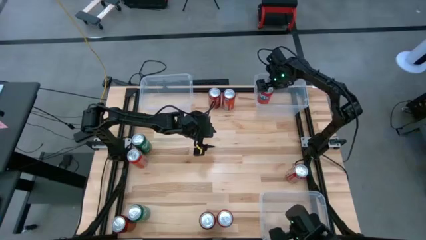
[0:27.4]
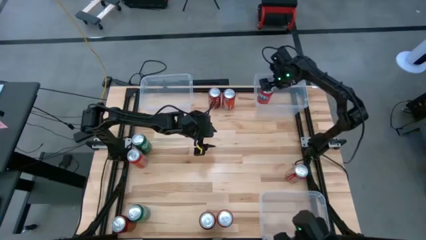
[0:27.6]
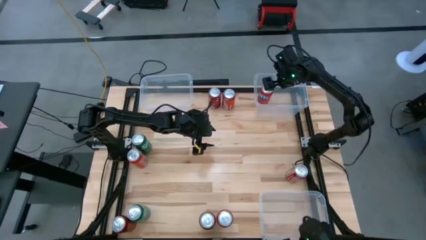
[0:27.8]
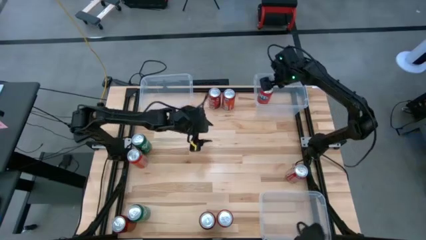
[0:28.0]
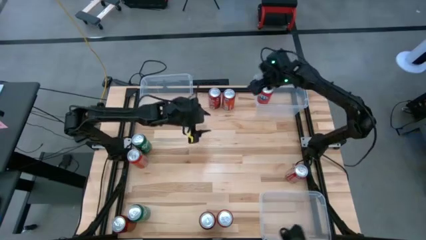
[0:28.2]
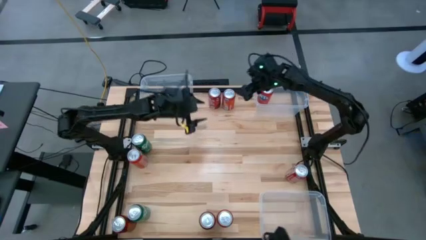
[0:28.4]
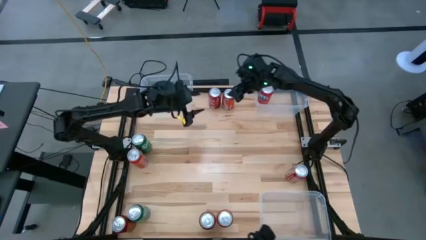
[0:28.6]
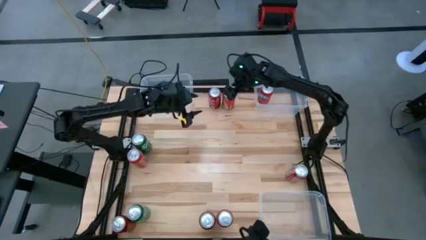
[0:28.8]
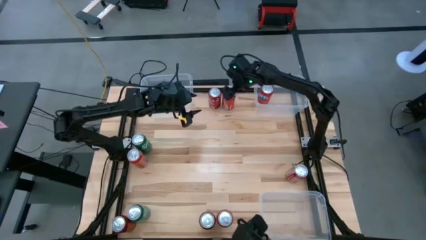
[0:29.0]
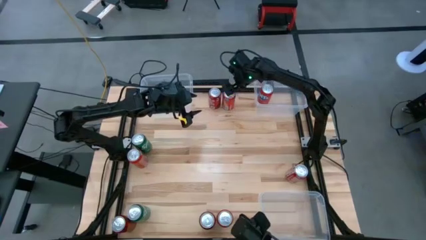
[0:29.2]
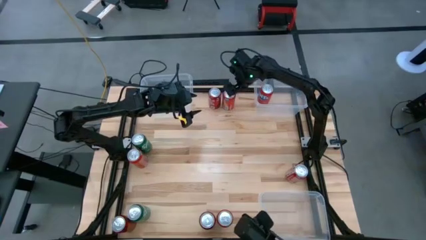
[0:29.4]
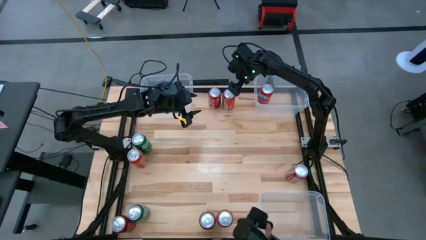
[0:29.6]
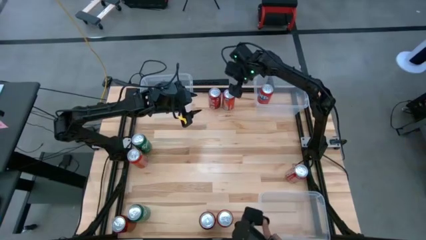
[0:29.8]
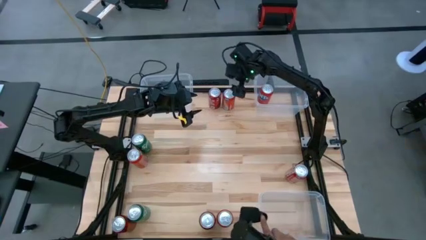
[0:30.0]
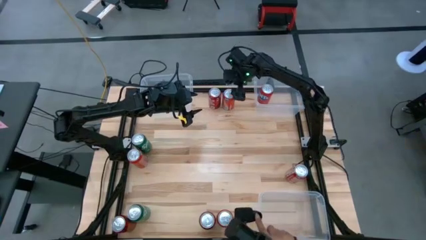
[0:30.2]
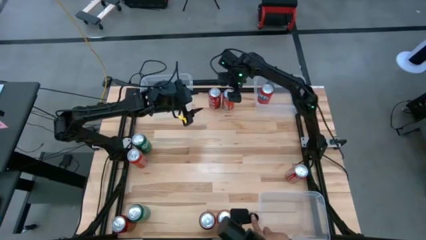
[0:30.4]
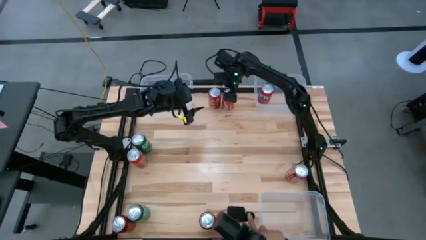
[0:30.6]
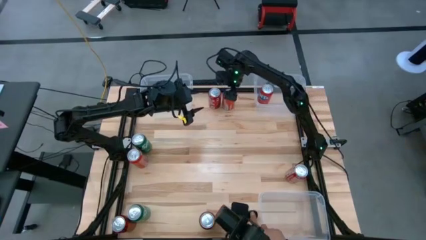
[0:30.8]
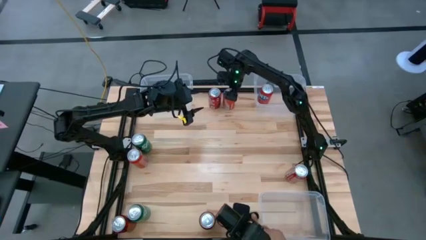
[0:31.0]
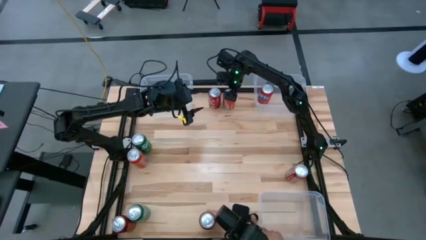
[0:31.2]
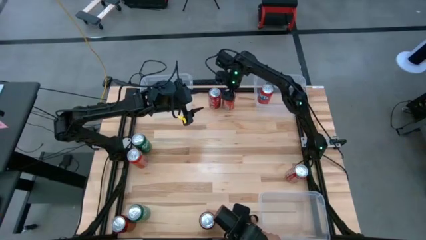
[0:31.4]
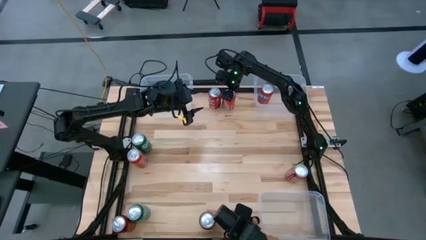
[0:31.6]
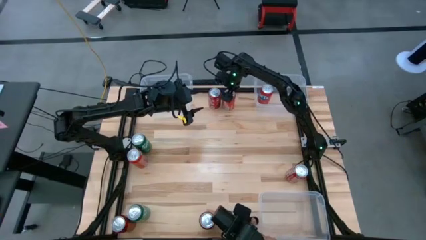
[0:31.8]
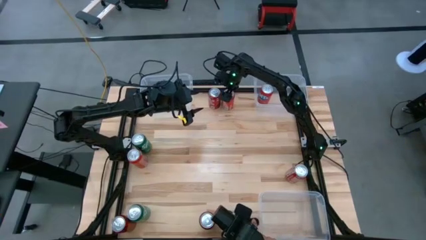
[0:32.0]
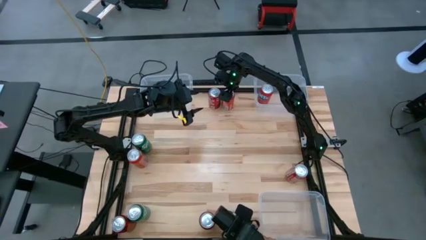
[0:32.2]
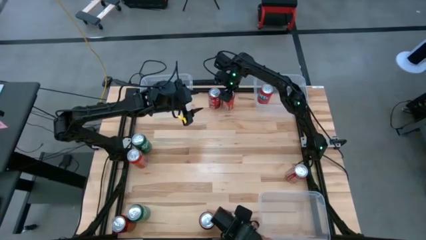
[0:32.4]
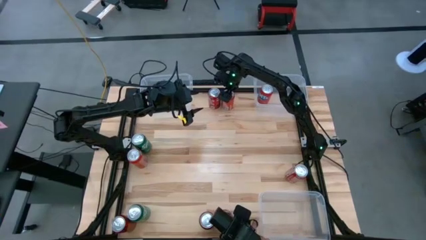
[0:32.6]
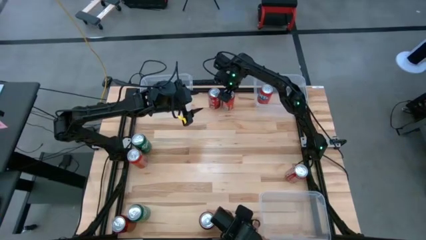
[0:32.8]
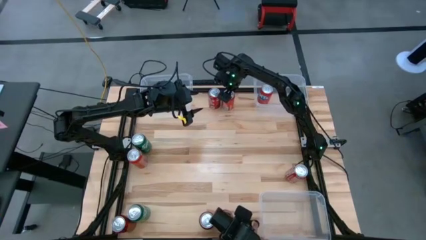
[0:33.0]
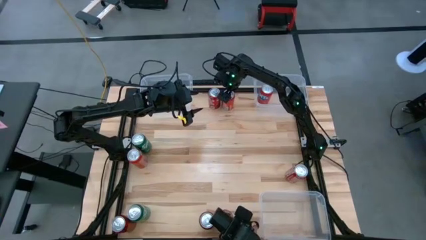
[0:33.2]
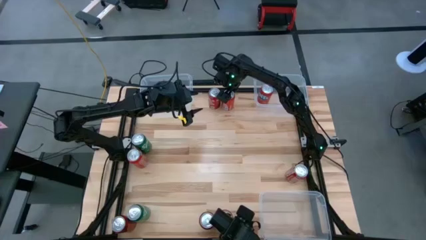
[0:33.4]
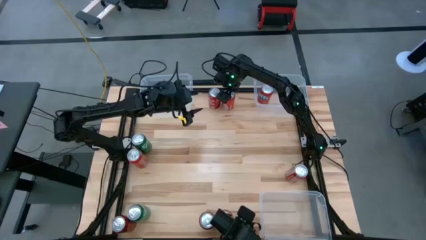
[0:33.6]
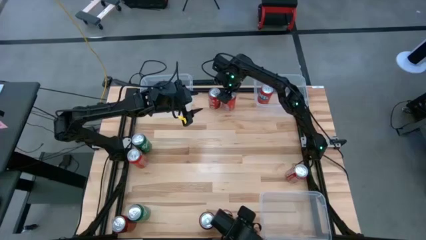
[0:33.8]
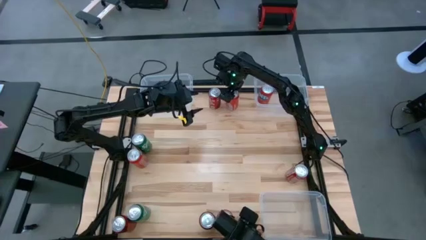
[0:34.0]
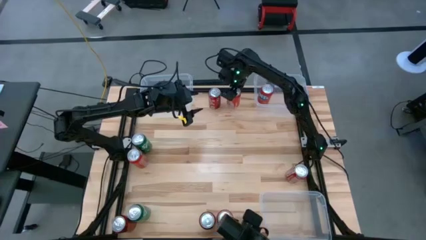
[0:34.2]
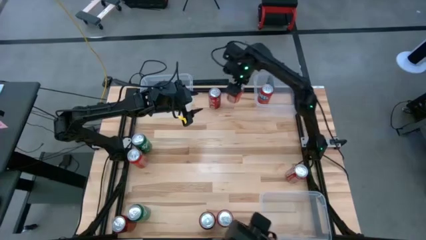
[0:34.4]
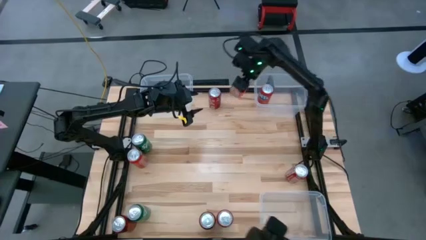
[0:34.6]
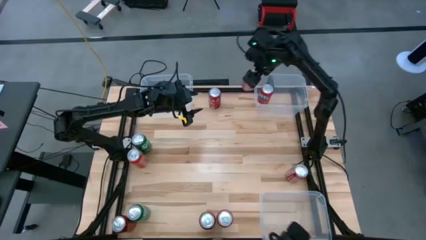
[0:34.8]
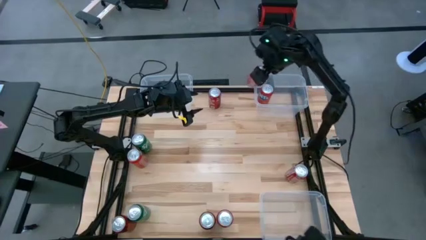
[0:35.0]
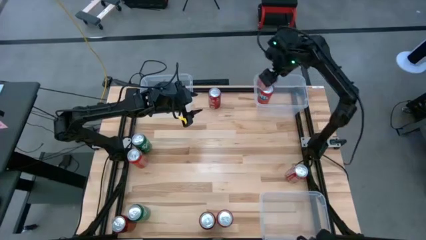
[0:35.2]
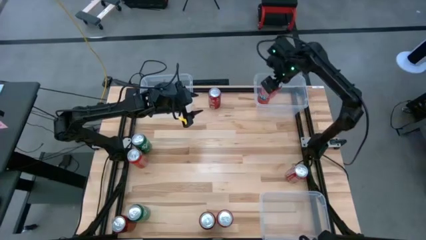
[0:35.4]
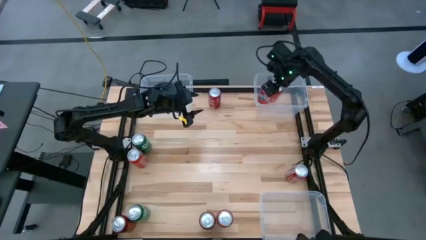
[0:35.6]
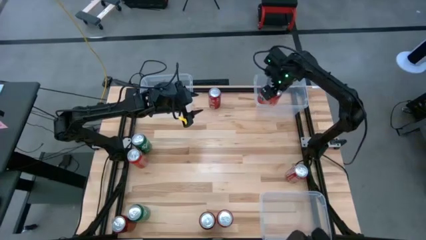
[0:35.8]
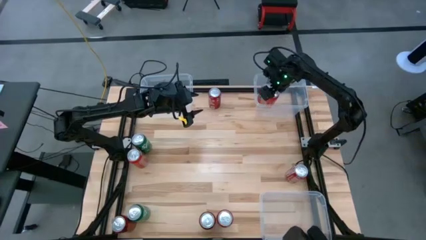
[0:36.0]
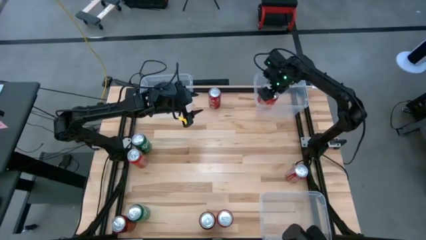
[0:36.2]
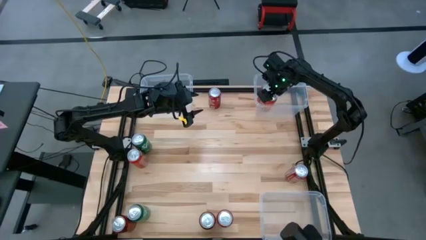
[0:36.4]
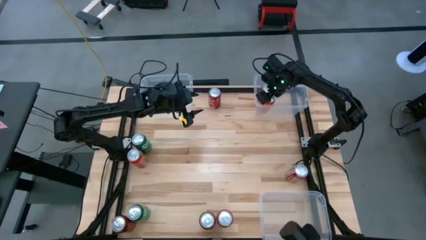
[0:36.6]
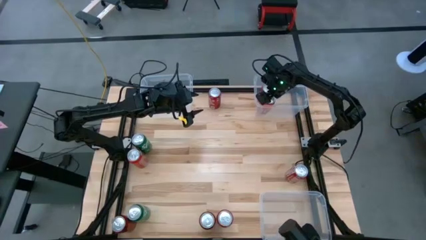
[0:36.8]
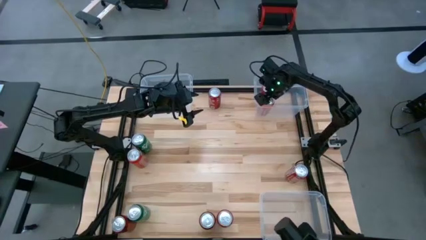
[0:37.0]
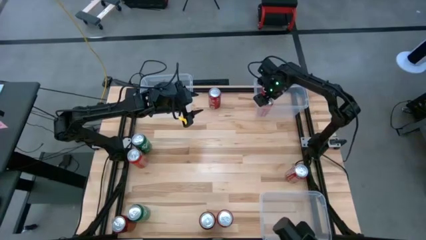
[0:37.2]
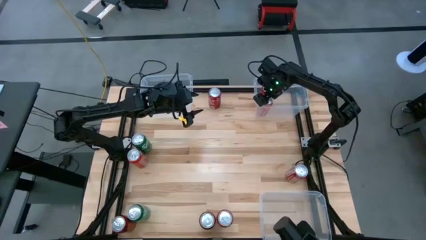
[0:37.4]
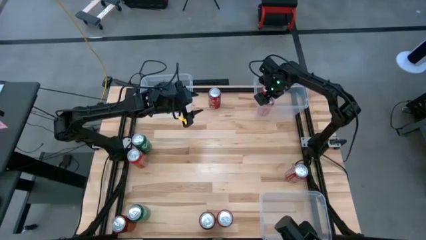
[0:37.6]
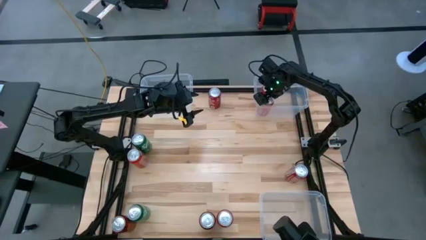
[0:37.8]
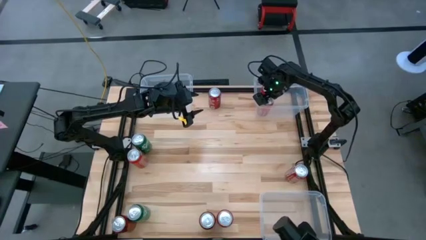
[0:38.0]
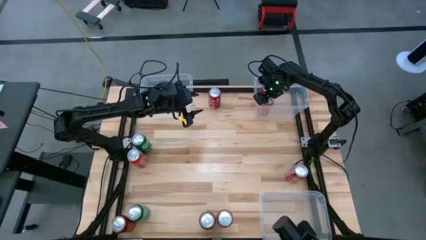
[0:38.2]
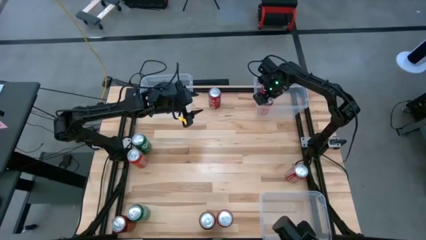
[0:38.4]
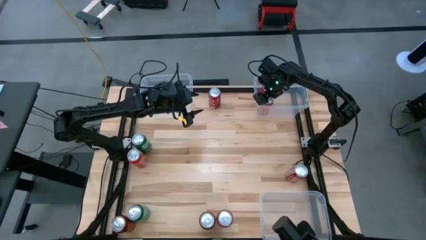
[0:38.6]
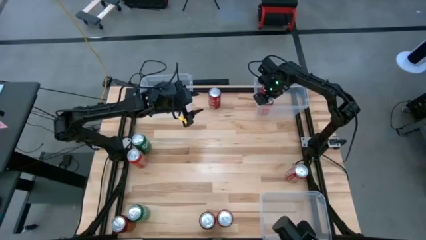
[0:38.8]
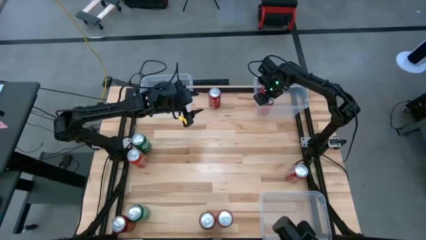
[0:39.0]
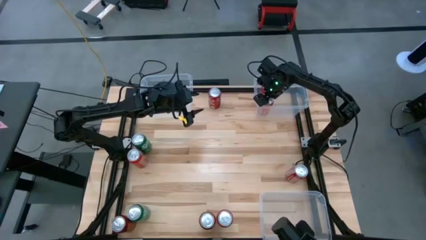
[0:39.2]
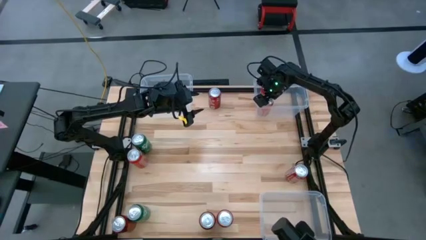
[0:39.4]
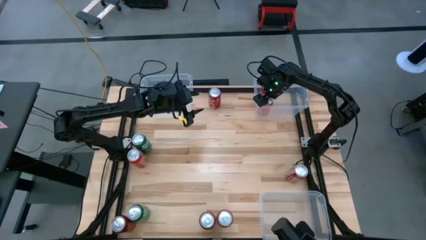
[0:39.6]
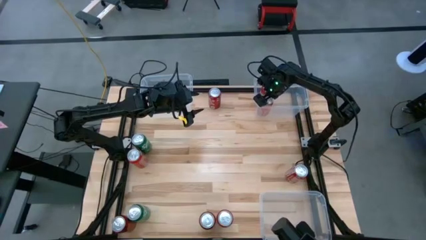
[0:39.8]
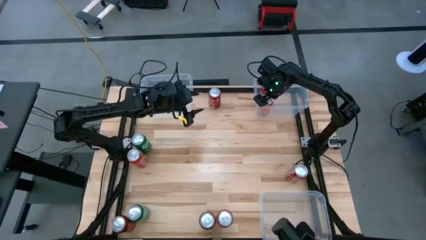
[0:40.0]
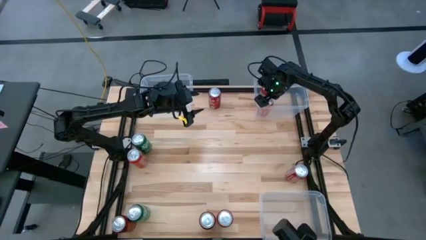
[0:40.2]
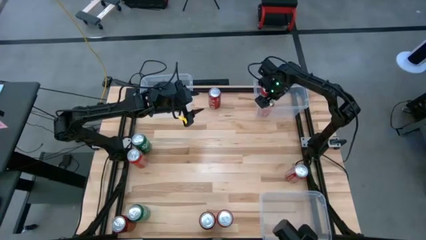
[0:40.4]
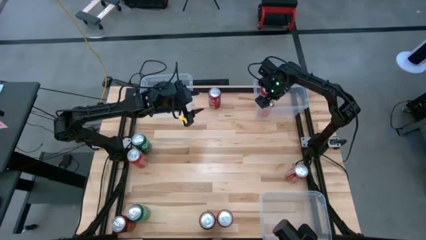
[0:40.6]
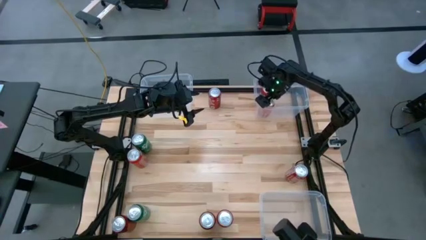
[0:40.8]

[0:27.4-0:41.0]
Task: Sort soda cans
Put the top red soda can into the top right transparent bin
